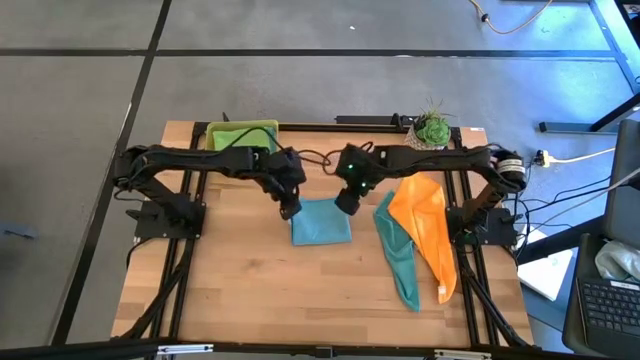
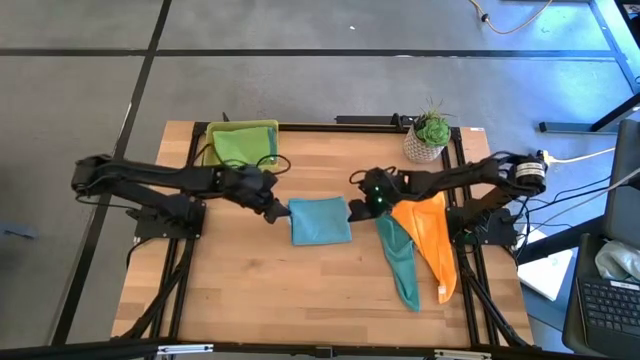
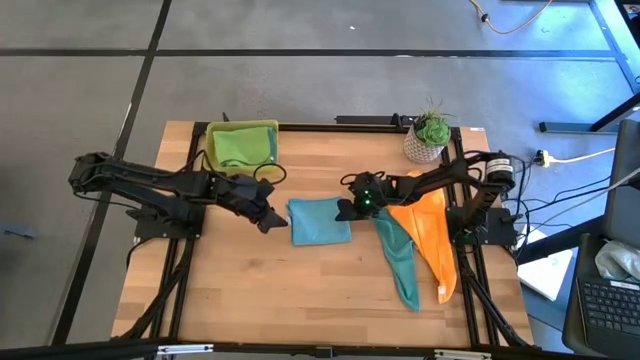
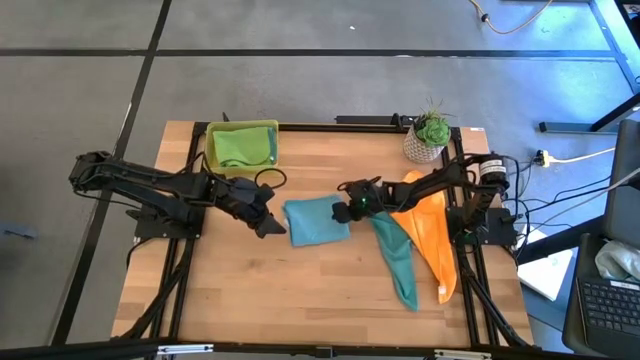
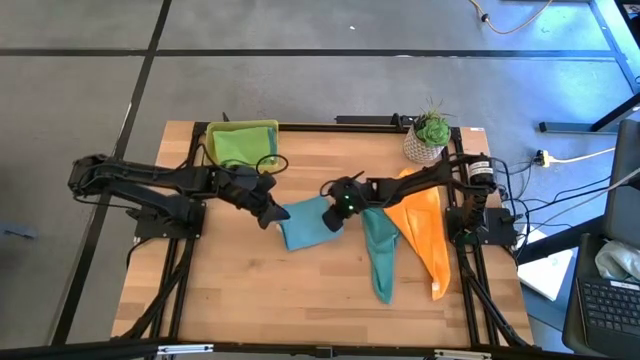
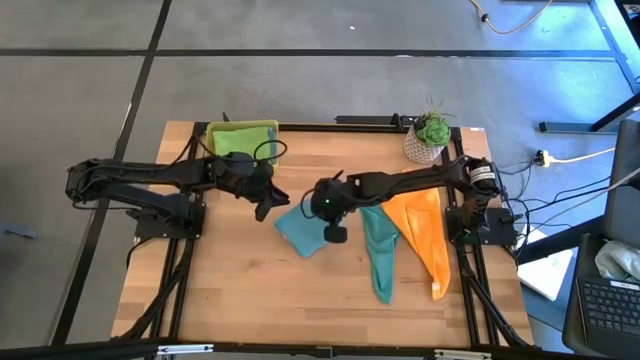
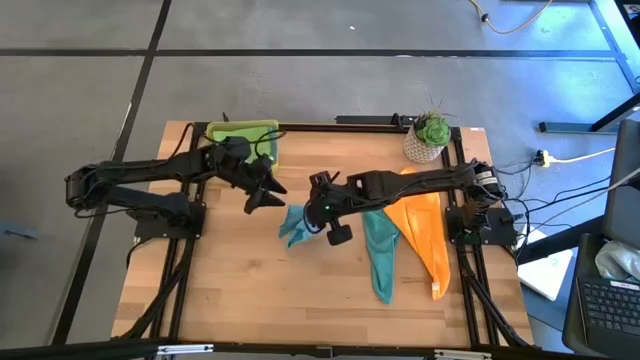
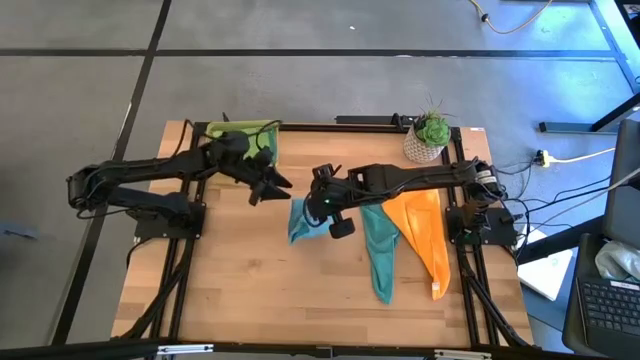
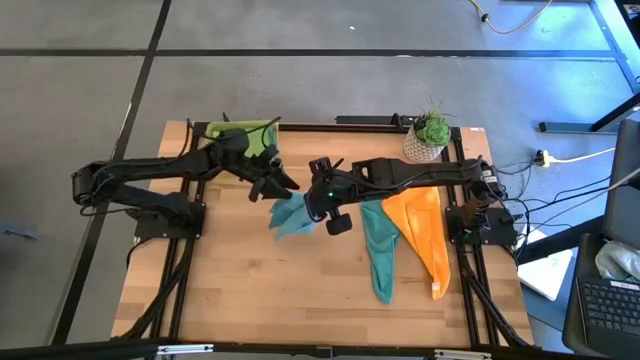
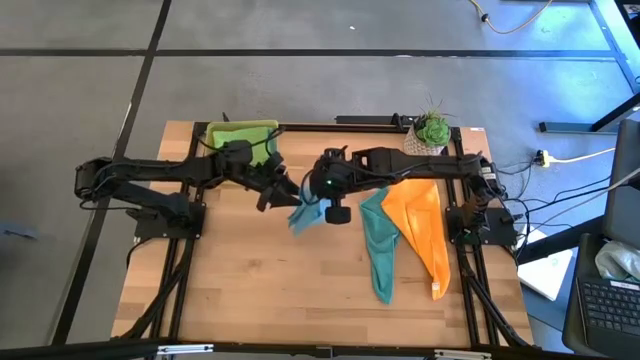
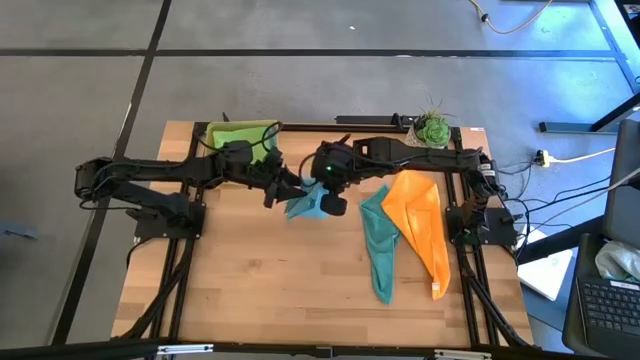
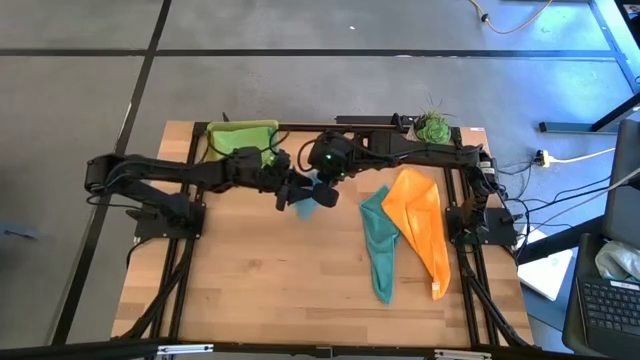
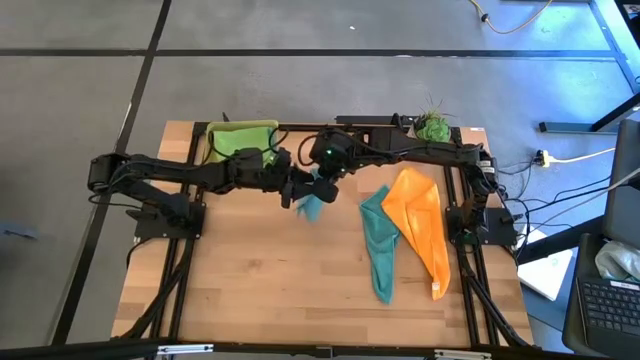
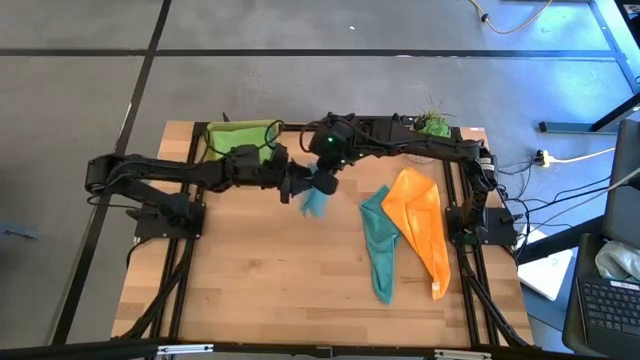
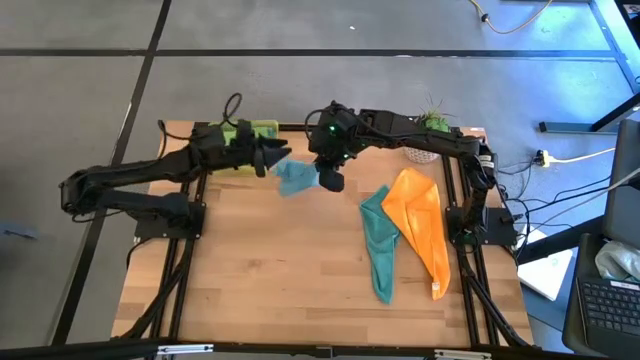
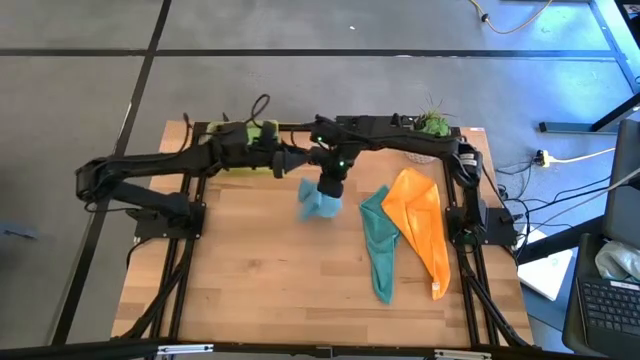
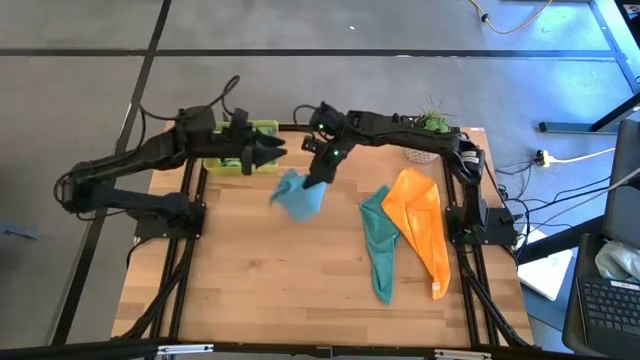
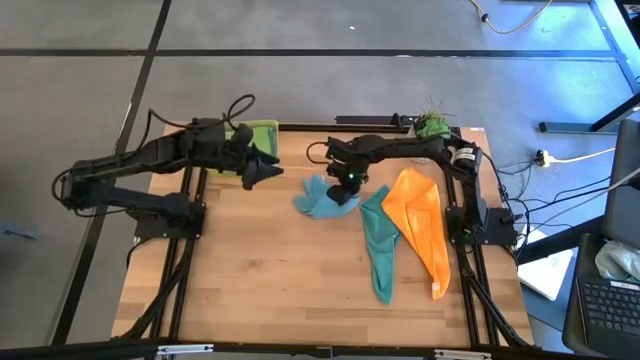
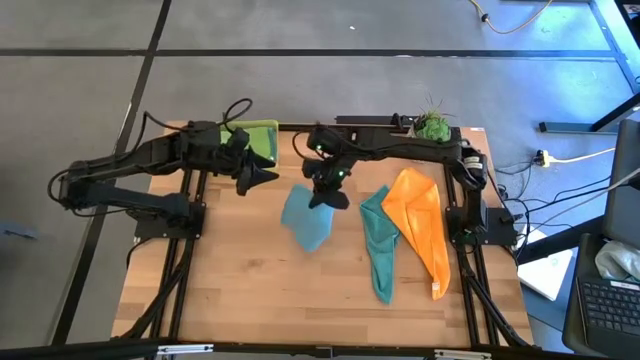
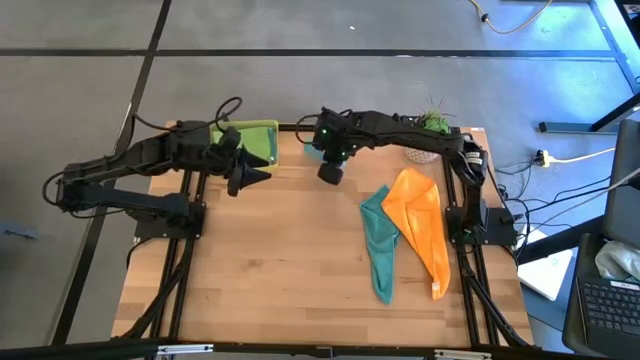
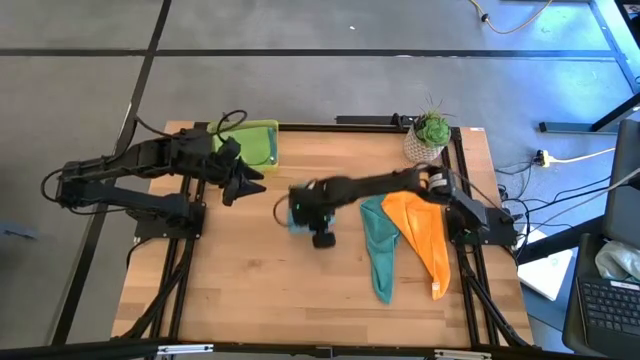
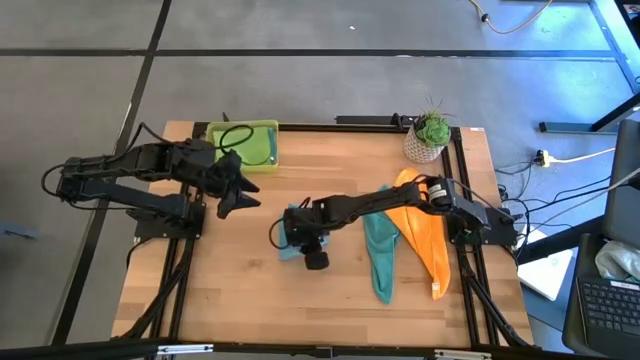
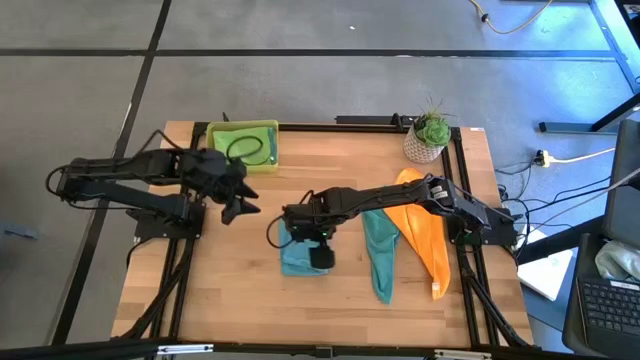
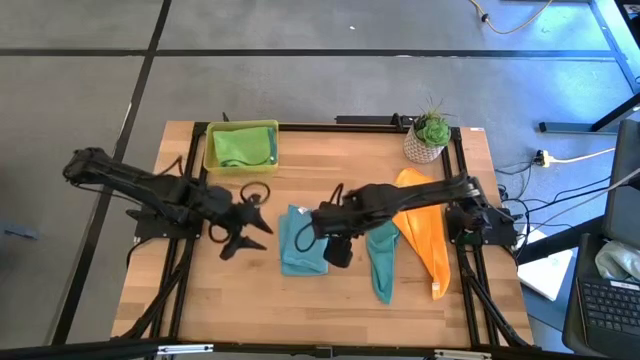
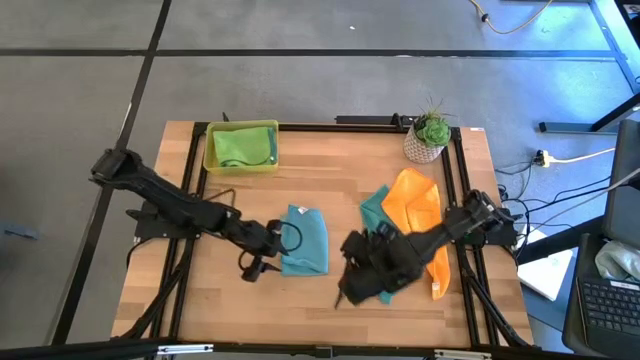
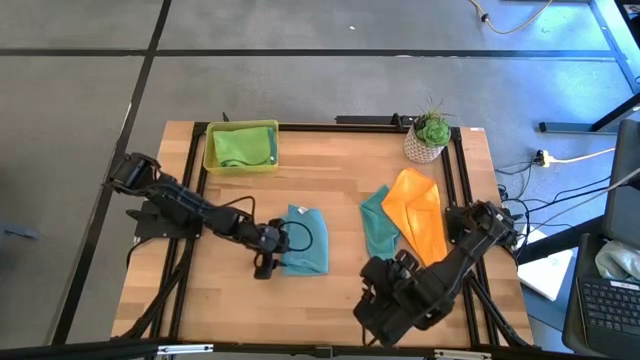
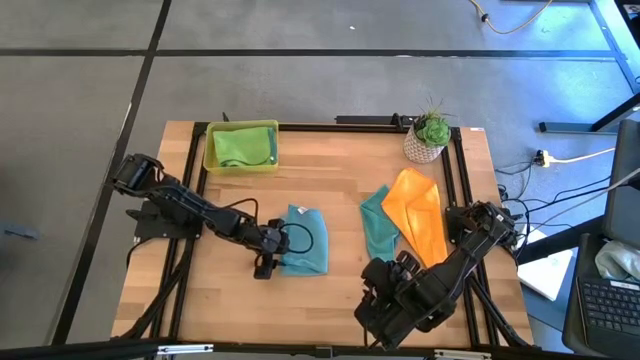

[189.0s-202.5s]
Task: Fold microfiber towels
Put the folded blue towel into the yellow bin

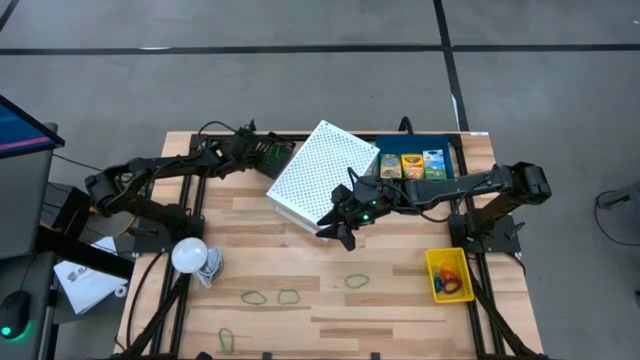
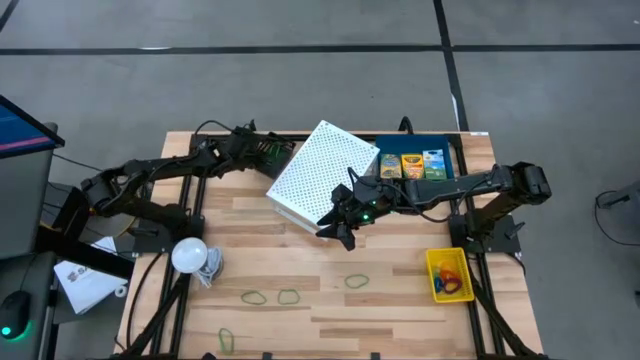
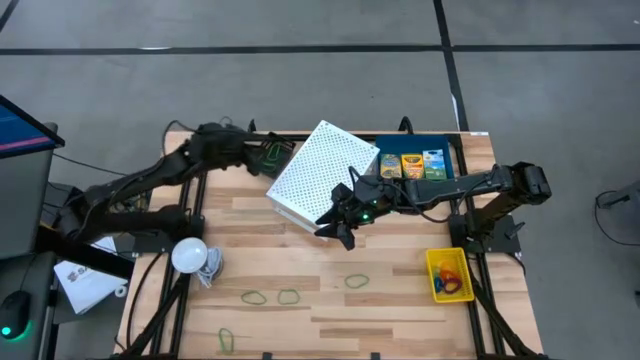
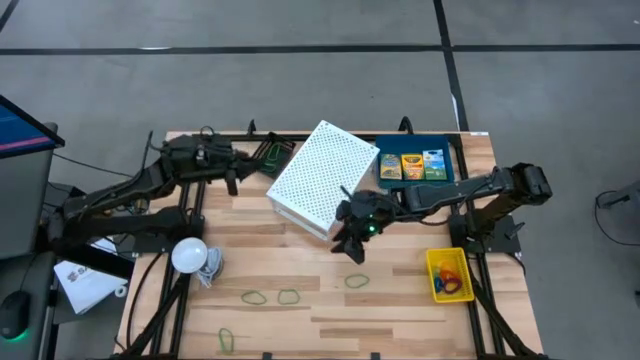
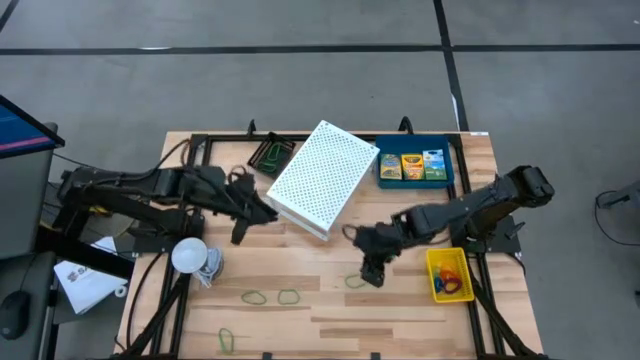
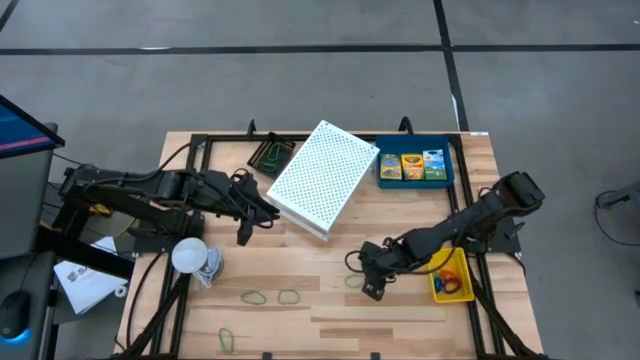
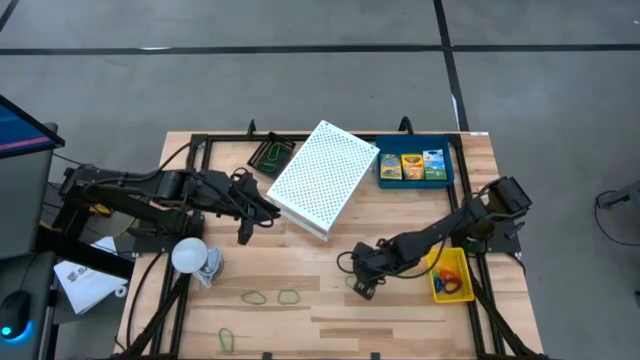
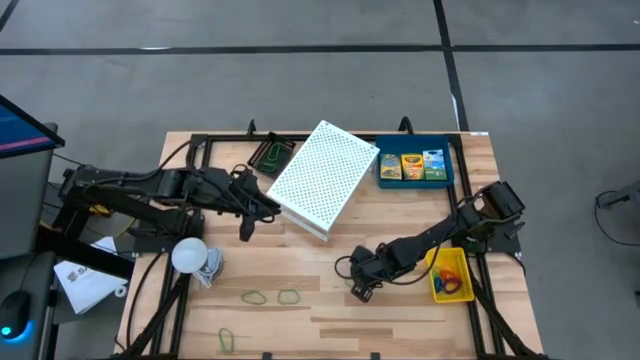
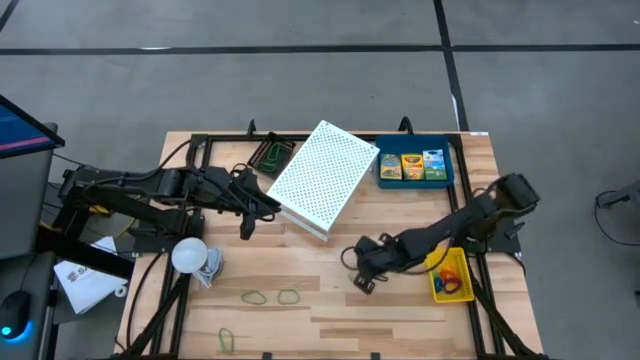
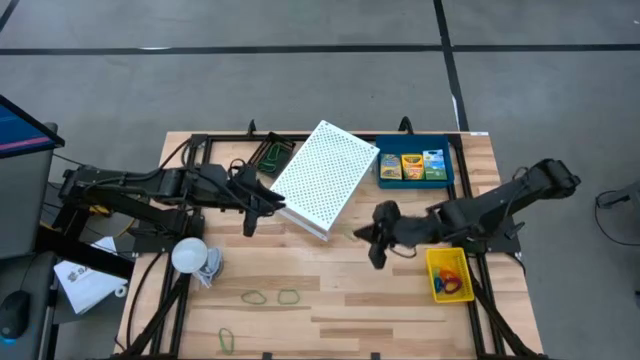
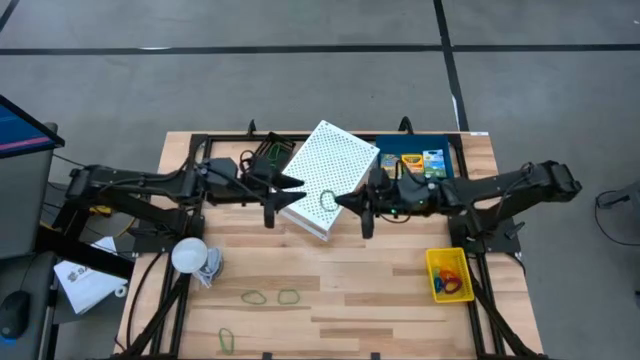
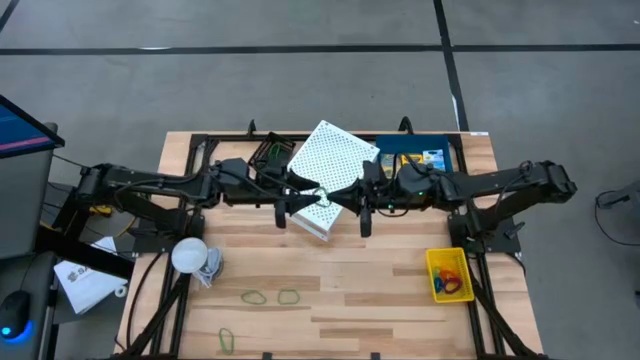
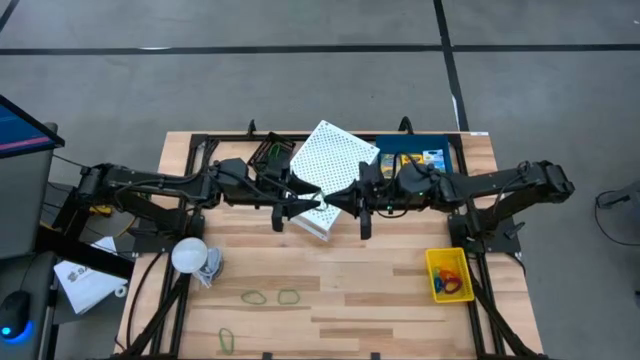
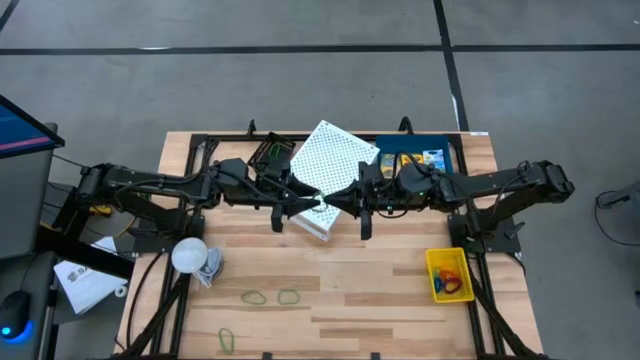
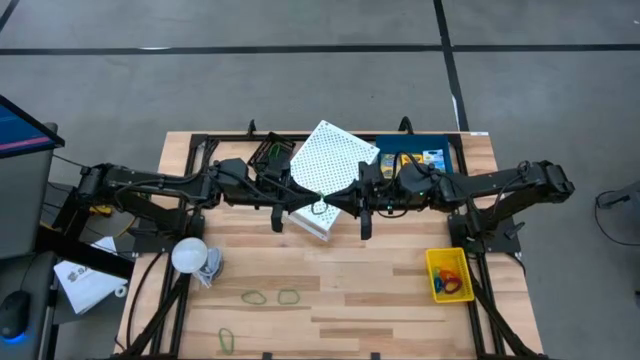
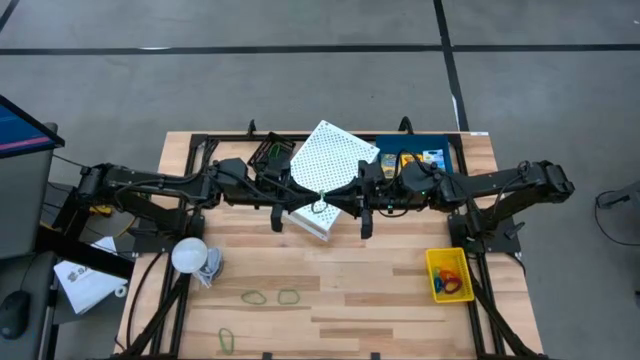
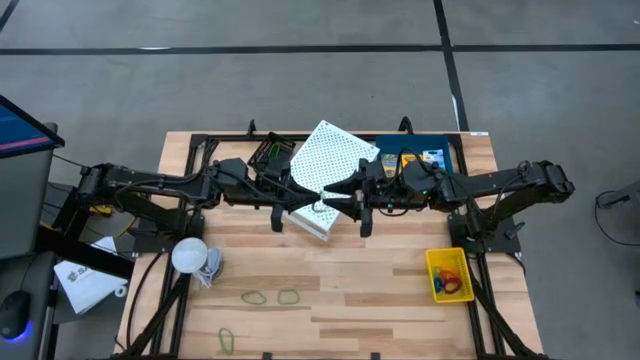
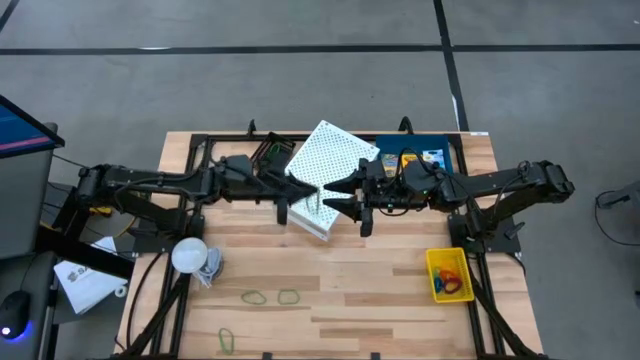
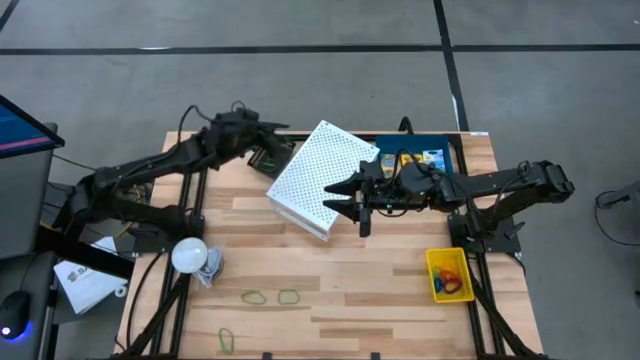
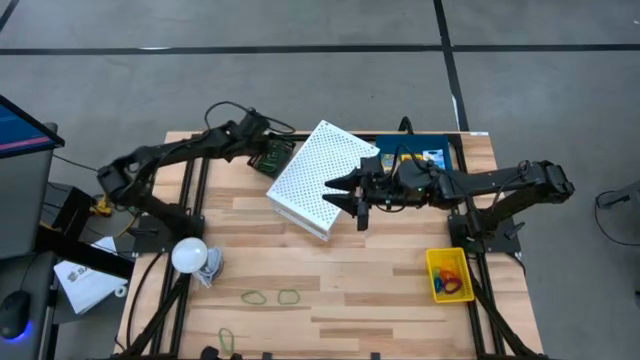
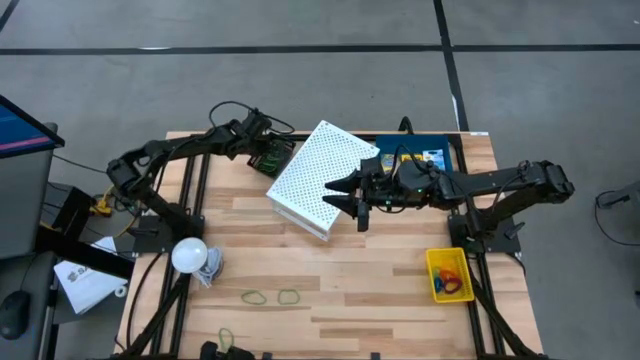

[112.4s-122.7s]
Task: Pick & Place Office Desk Supplies
Put the green rubber band into the black bin
